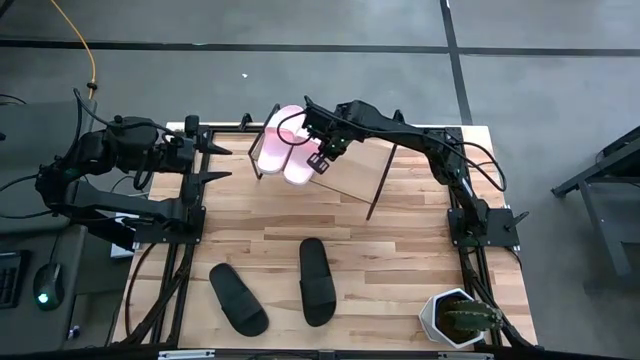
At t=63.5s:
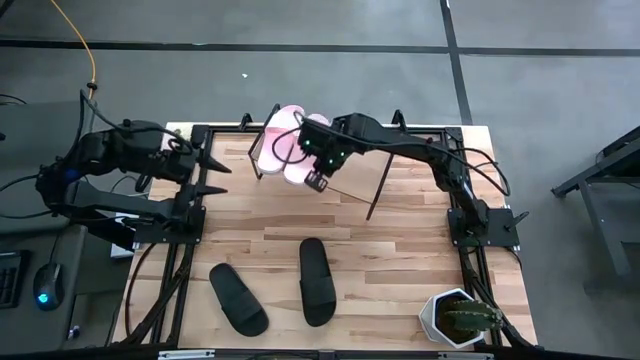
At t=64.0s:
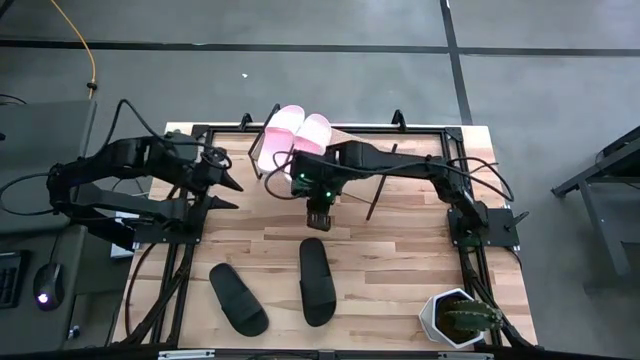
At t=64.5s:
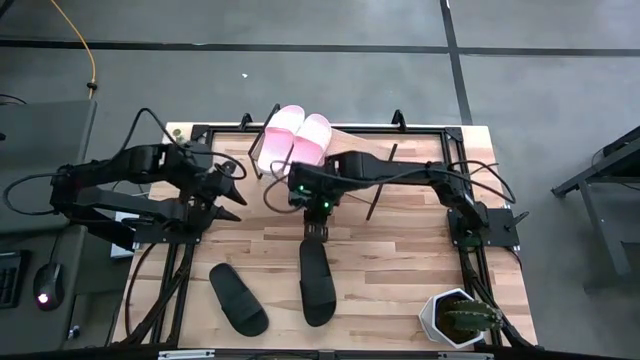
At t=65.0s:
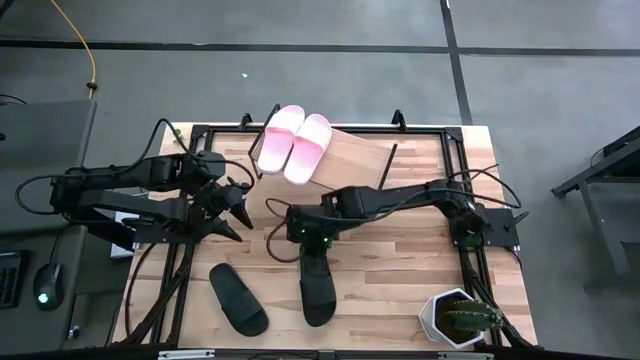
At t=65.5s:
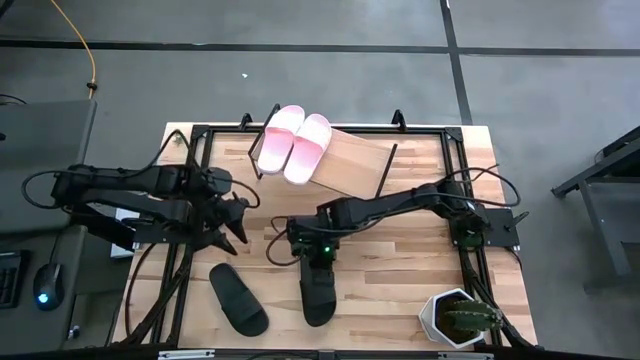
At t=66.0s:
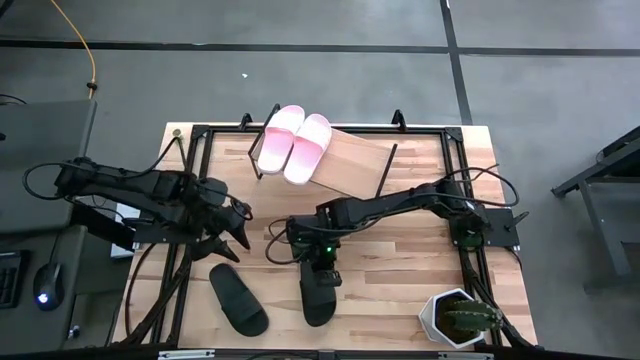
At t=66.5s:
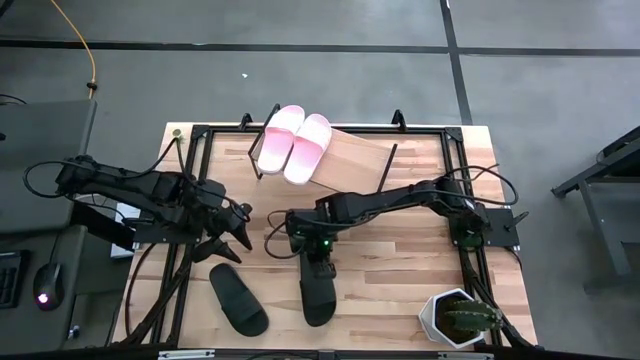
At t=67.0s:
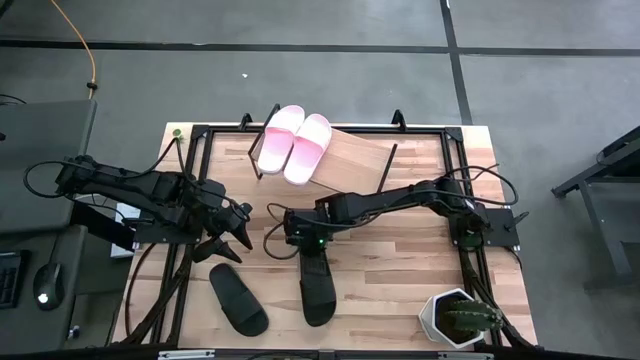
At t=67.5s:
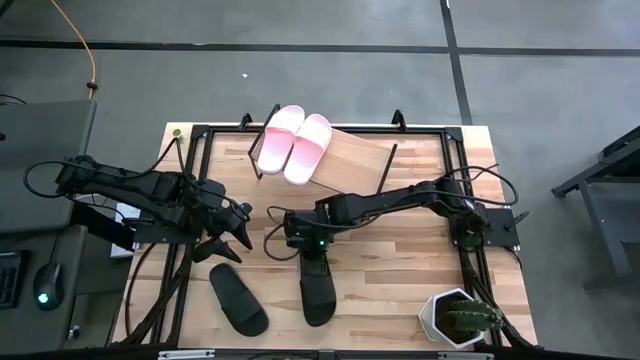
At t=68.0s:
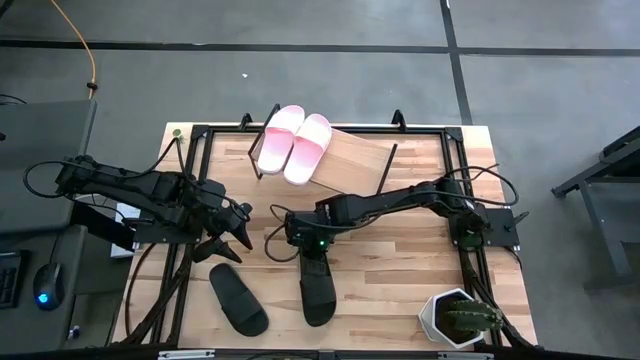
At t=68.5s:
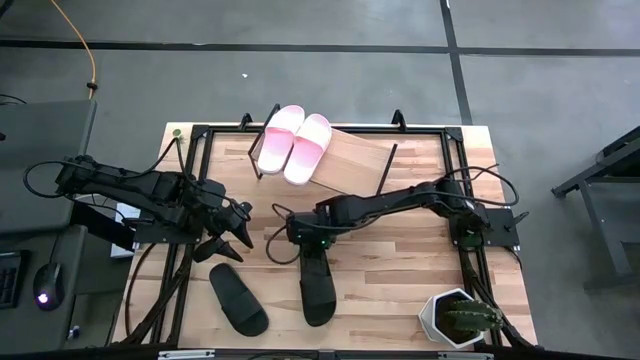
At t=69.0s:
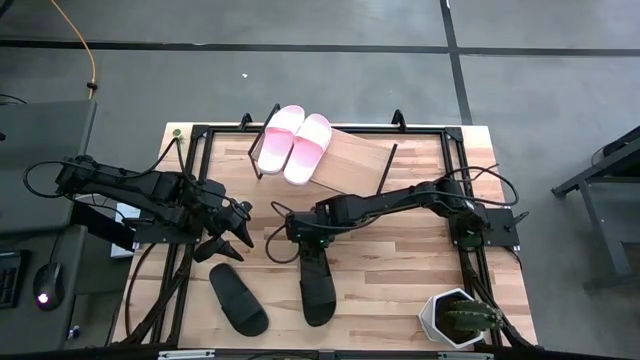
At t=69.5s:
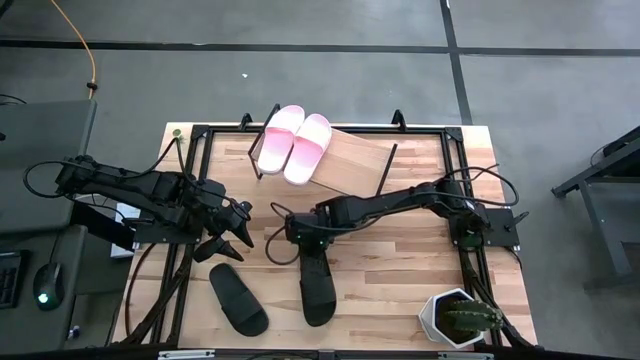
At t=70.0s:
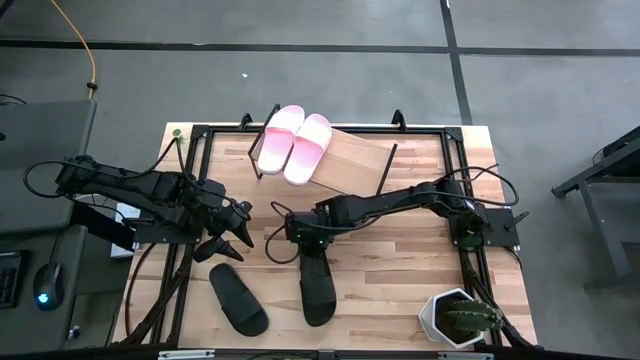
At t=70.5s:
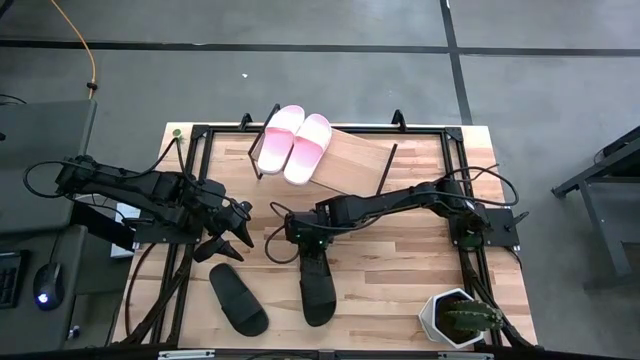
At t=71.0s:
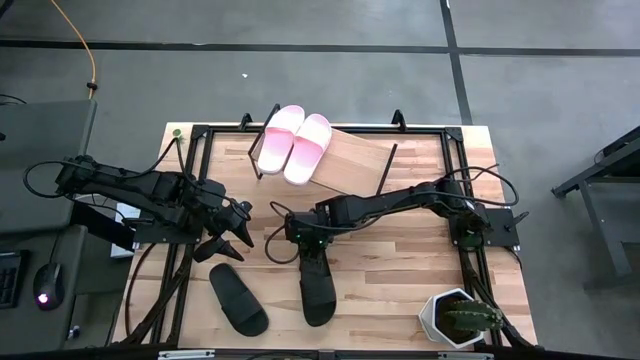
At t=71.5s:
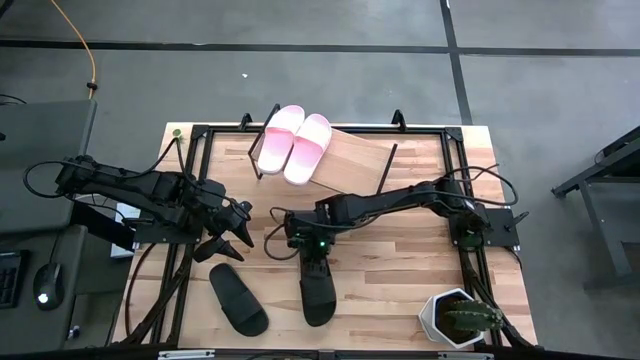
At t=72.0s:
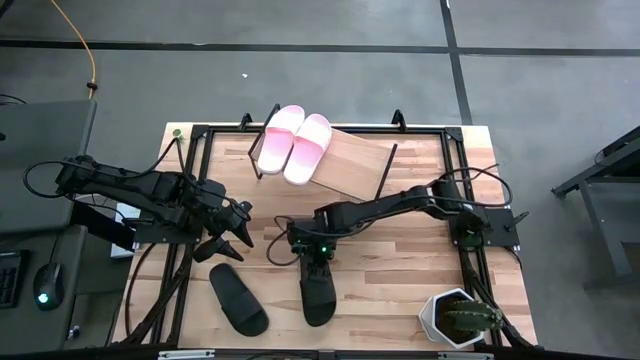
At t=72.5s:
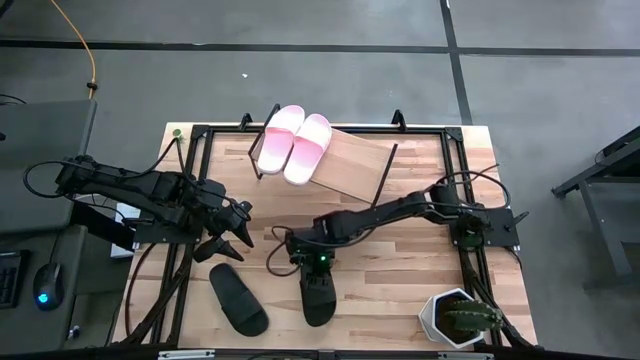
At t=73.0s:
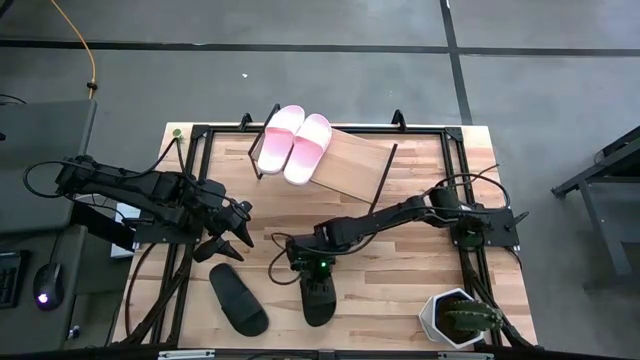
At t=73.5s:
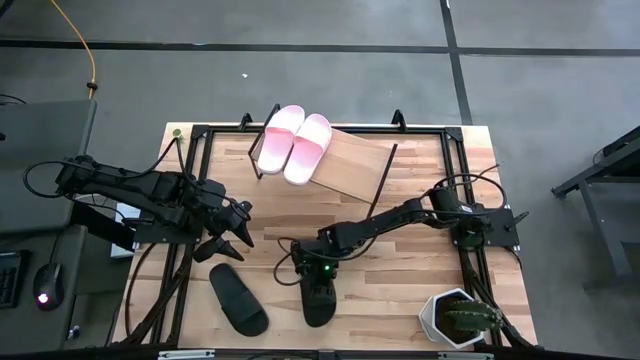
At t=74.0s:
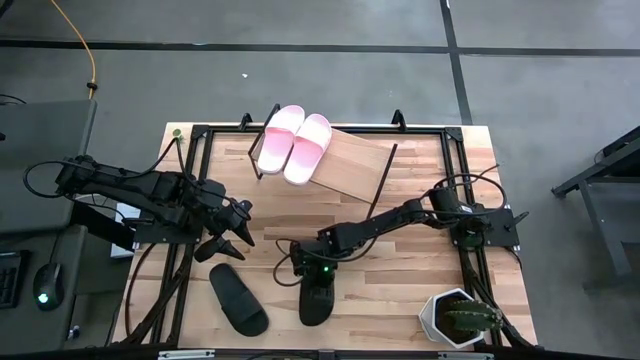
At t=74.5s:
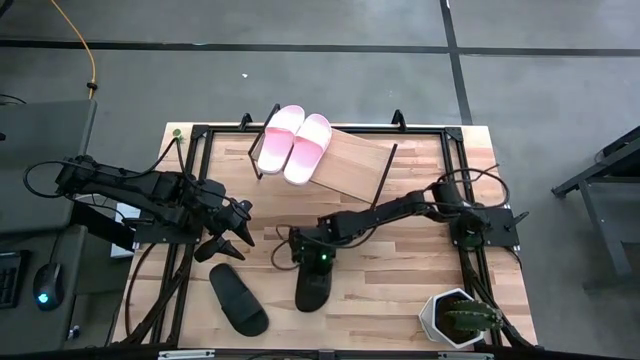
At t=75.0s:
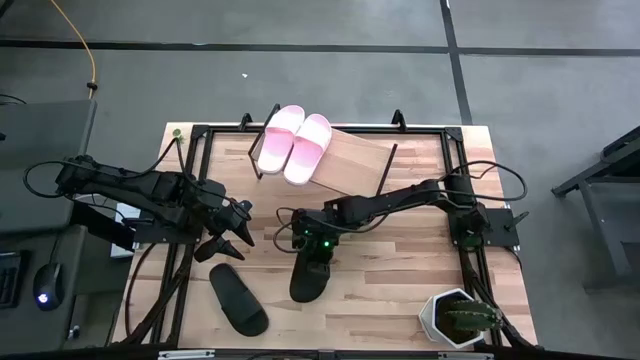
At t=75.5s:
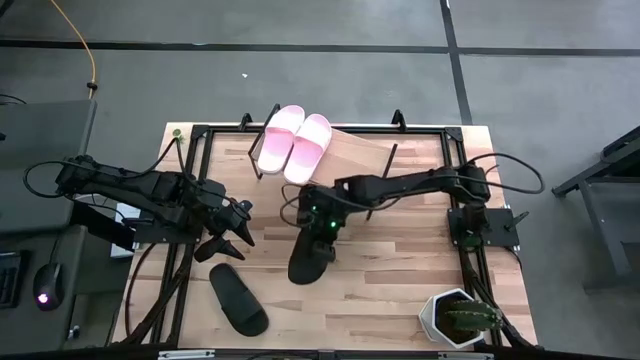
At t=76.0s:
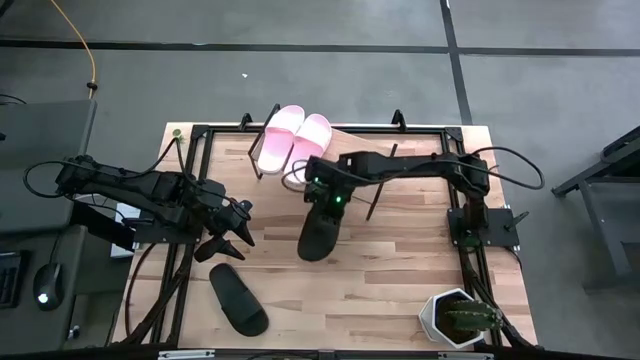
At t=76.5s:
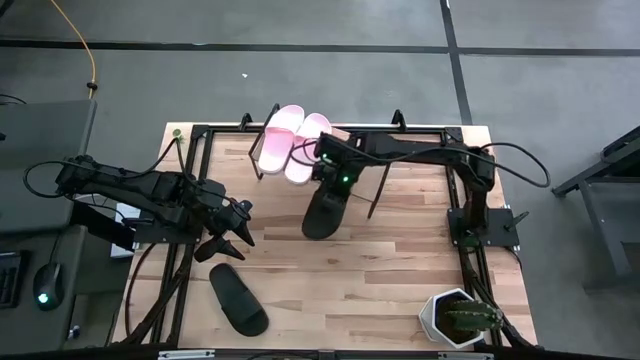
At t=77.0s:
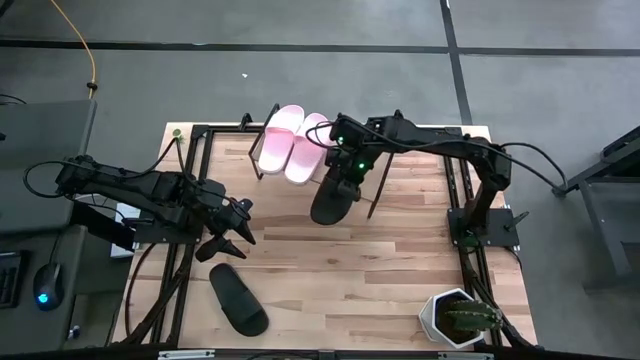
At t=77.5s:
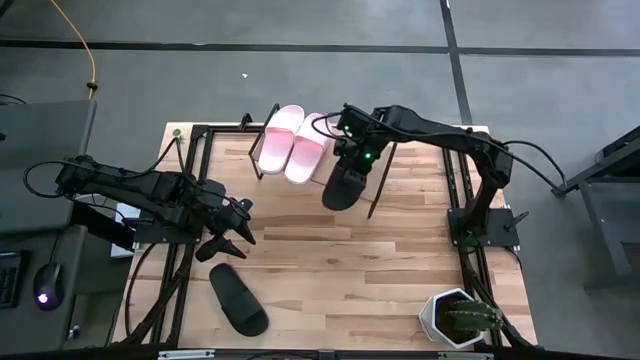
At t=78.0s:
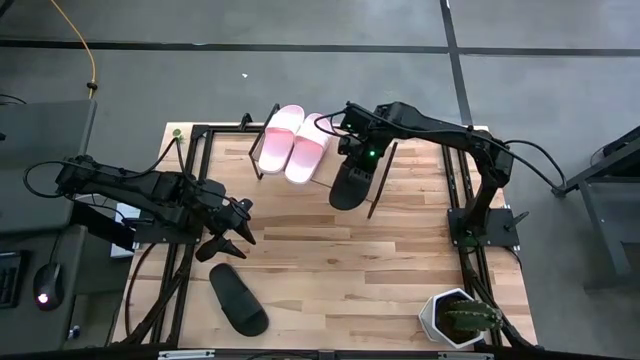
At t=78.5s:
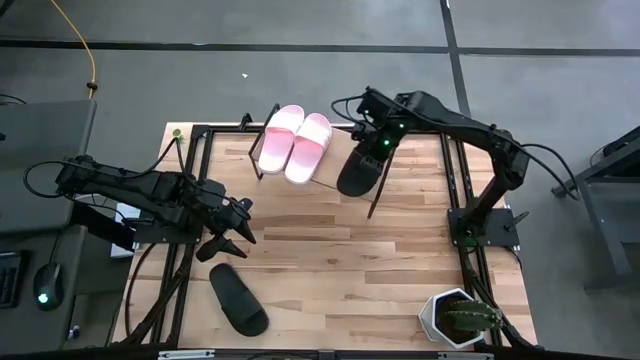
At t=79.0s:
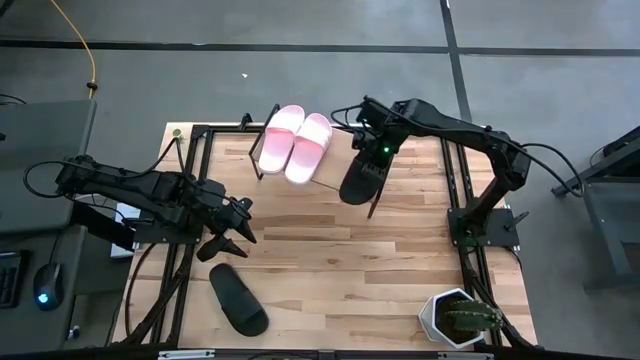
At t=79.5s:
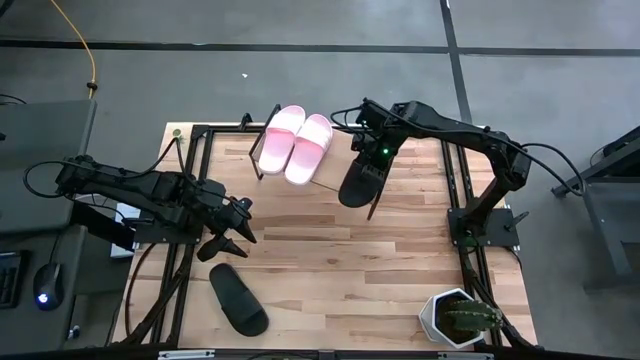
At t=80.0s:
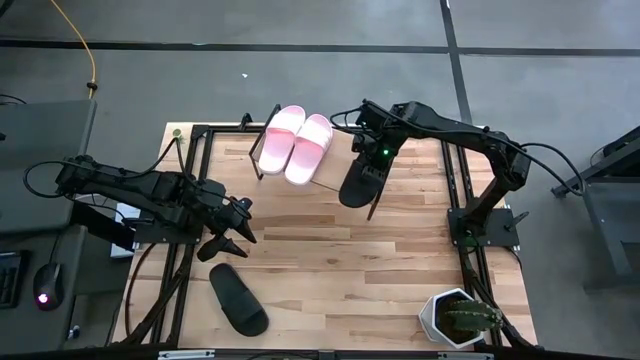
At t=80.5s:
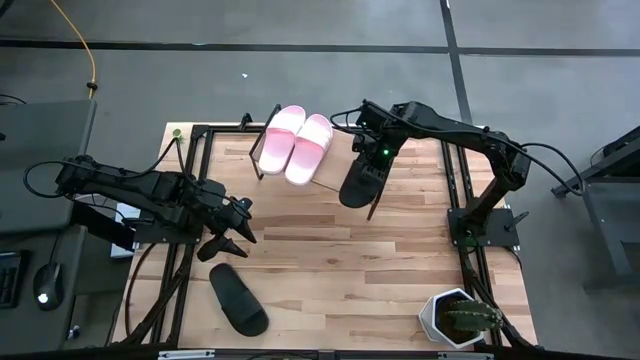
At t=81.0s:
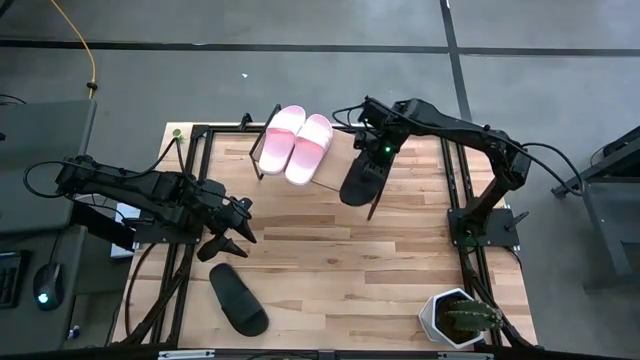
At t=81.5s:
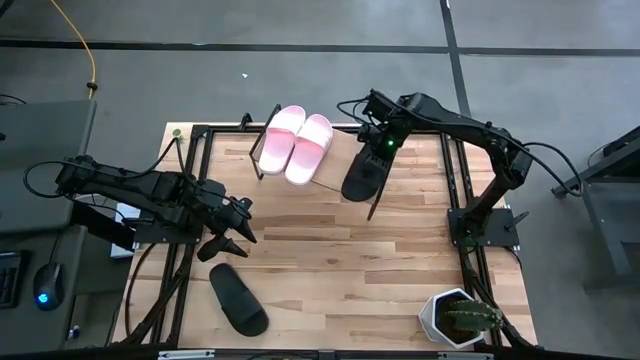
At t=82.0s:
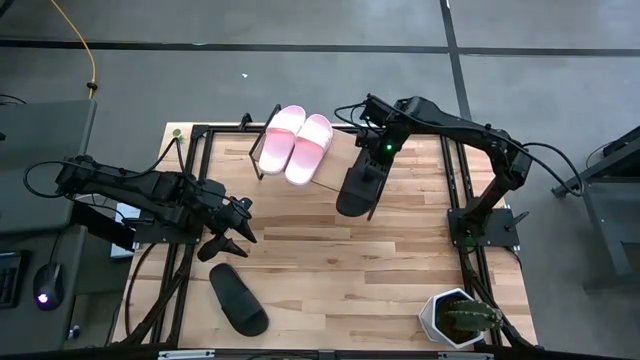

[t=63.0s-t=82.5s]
Task: Pick and place slides into the shelf
Put the right black slide on the shelf

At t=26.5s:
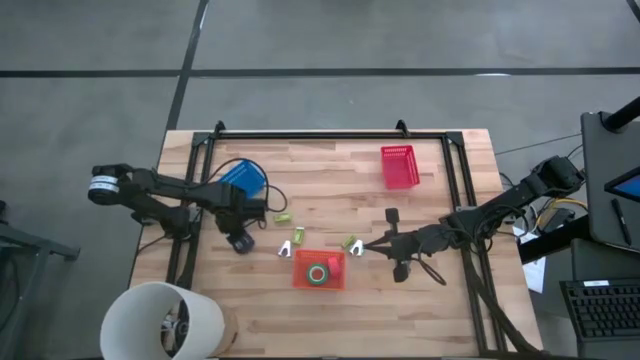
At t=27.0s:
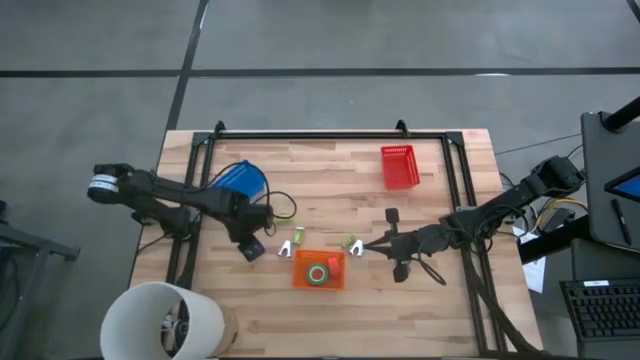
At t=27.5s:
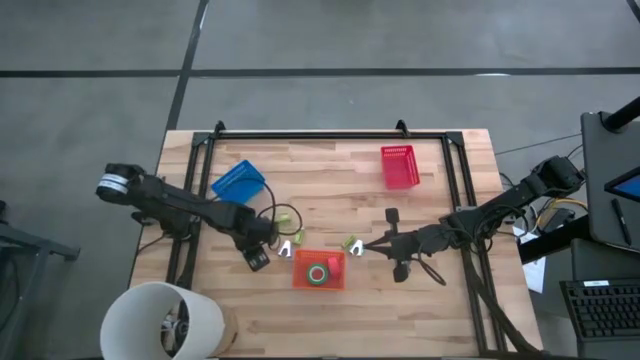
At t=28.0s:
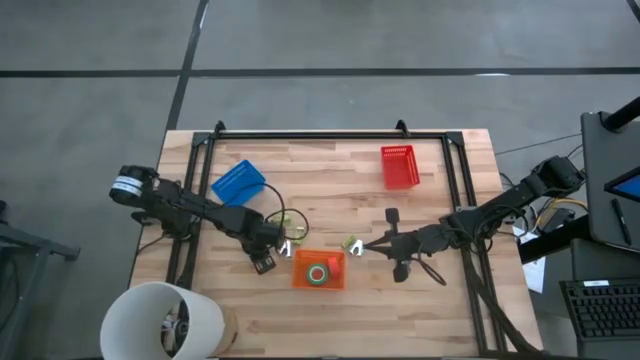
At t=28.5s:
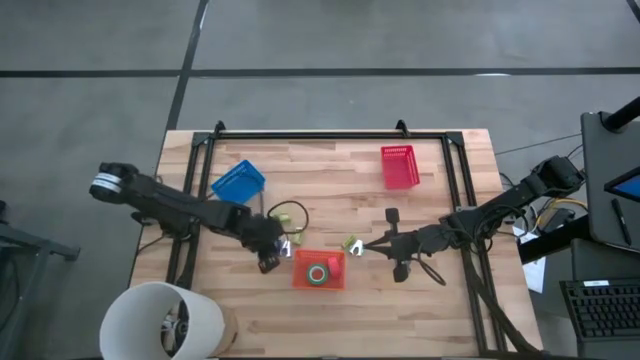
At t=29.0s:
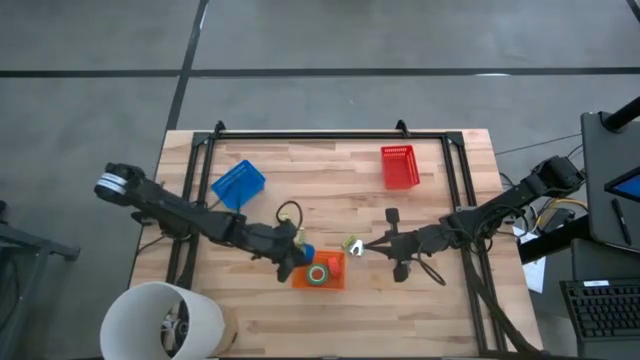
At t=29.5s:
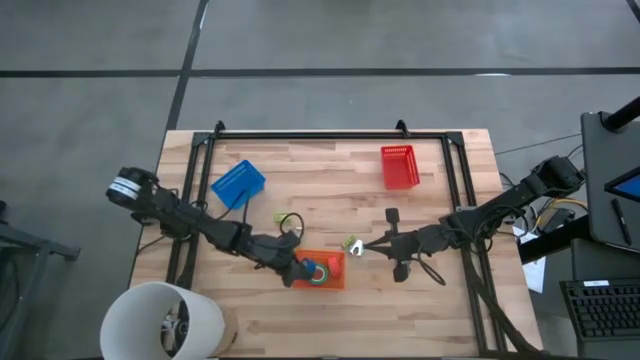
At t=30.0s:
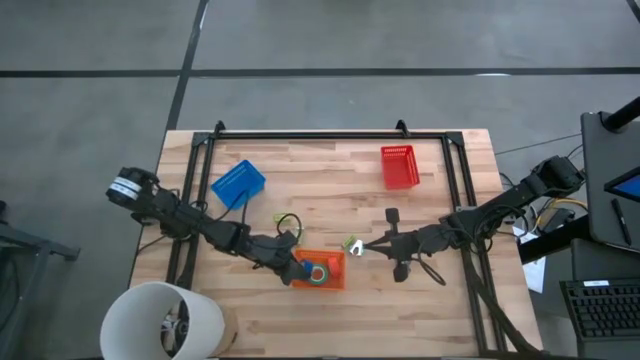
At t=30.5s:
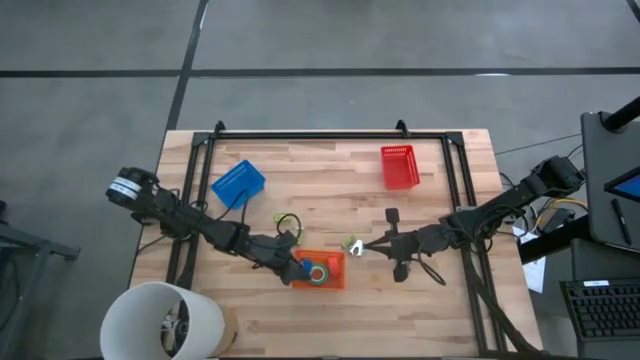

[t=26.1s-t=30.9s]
Task: Pick and place Stapler, Stapler remover, tape
Put the blue tape into the orange bin
